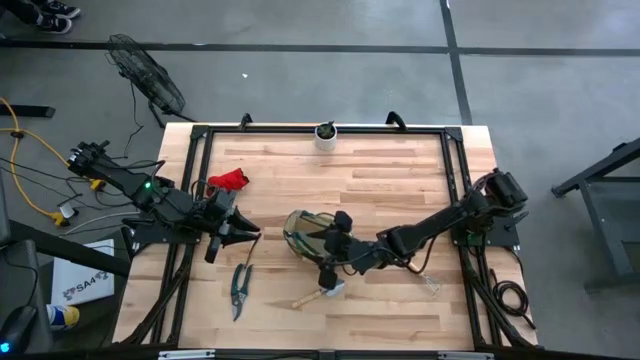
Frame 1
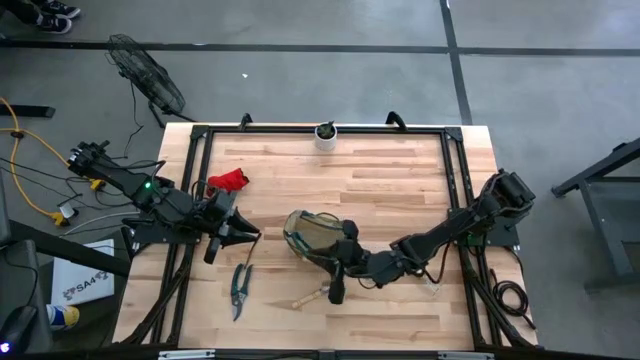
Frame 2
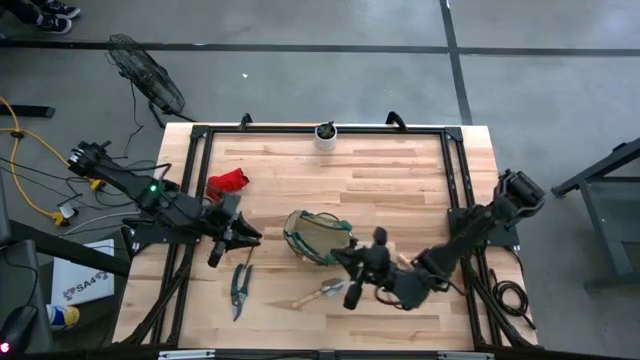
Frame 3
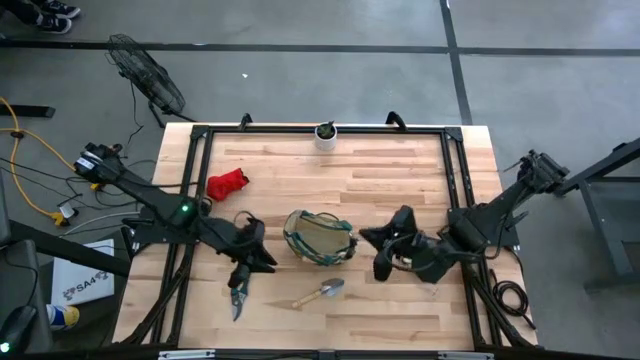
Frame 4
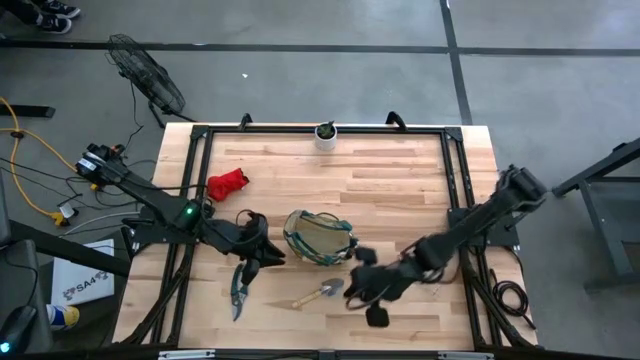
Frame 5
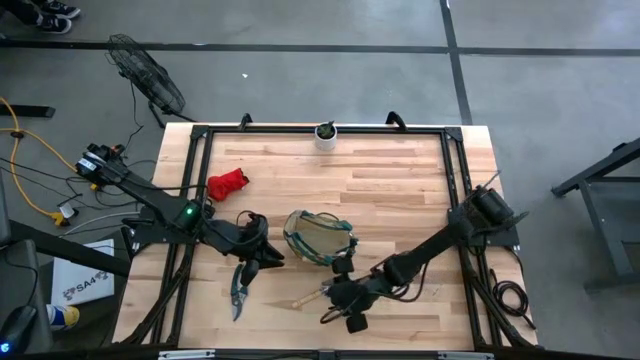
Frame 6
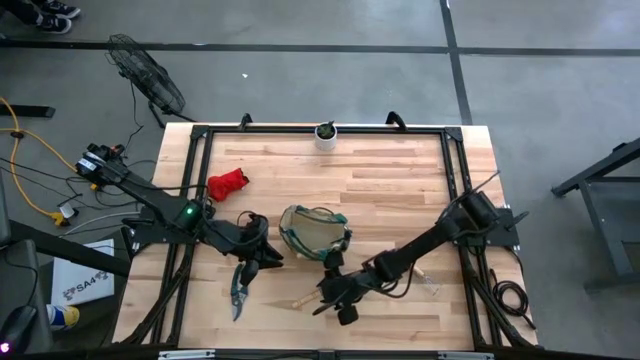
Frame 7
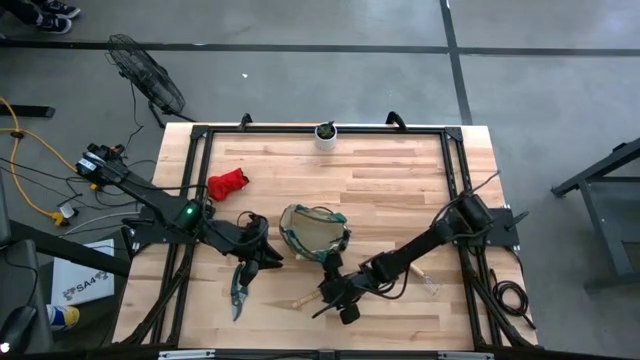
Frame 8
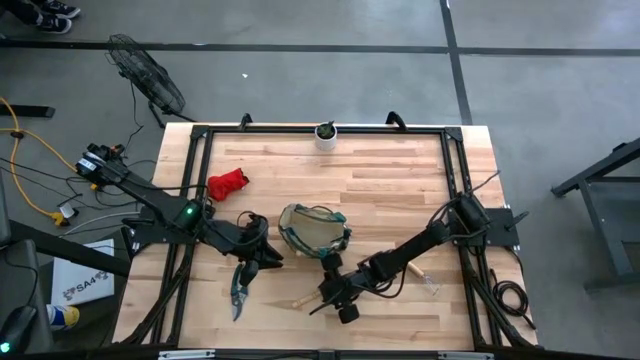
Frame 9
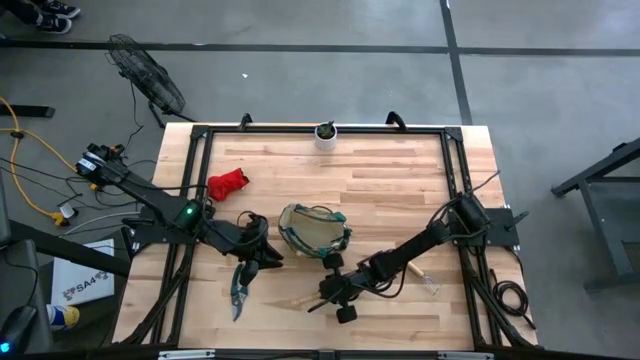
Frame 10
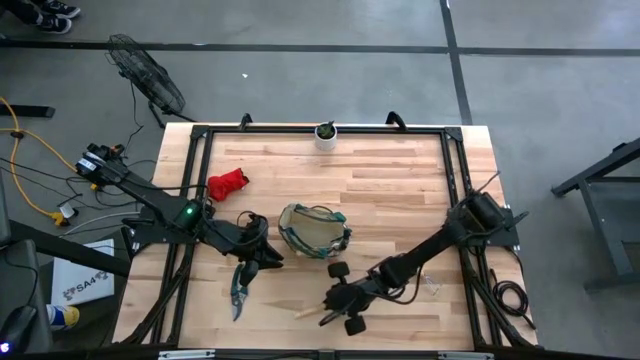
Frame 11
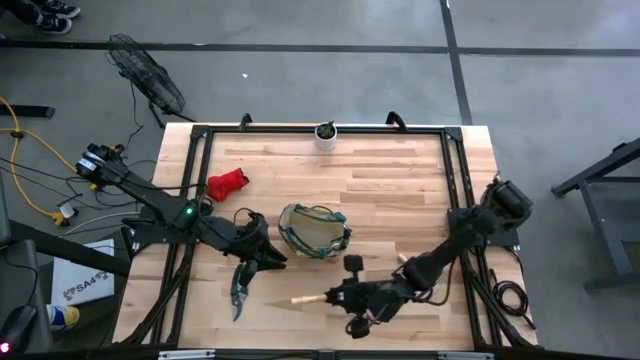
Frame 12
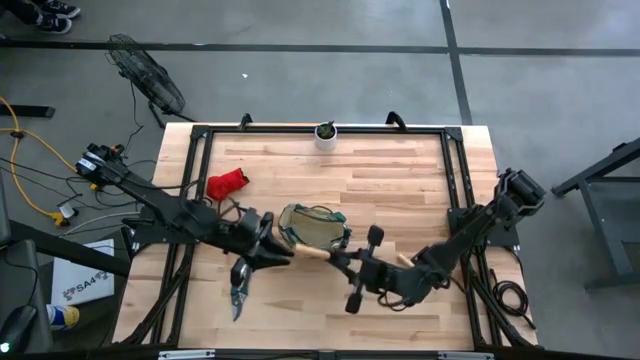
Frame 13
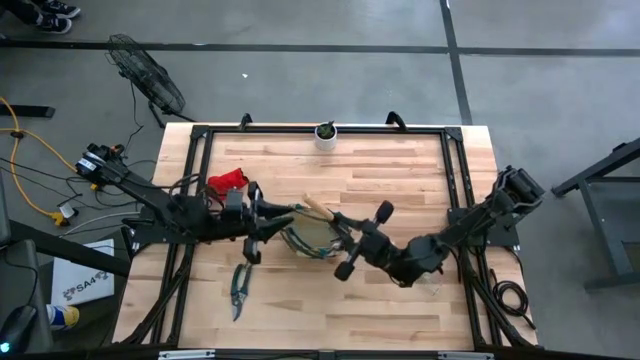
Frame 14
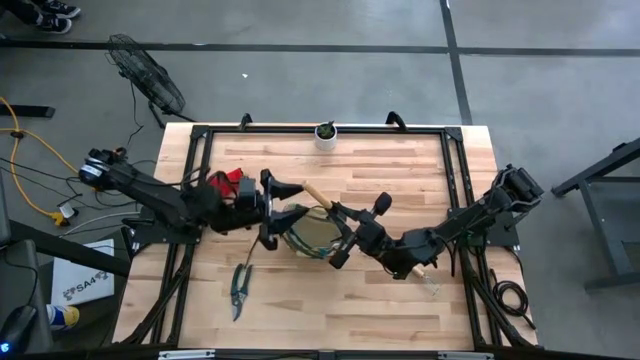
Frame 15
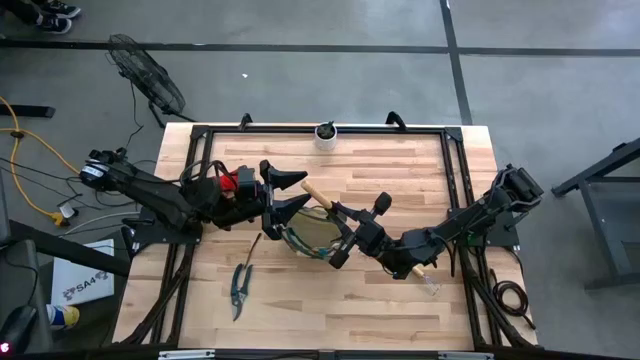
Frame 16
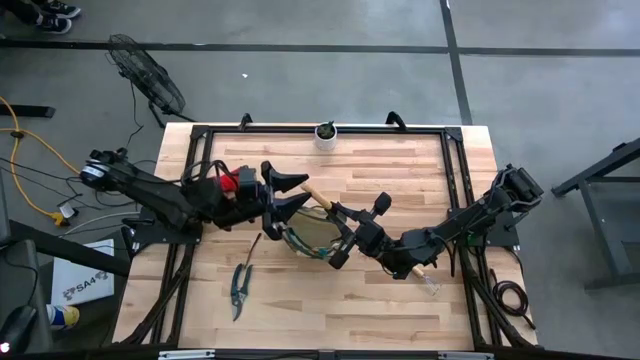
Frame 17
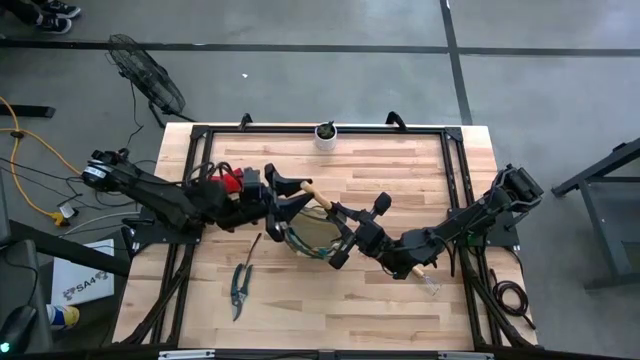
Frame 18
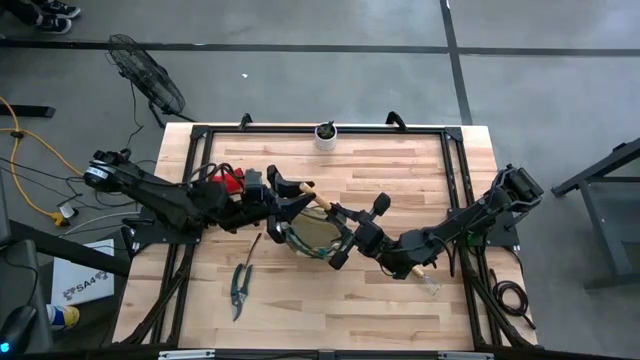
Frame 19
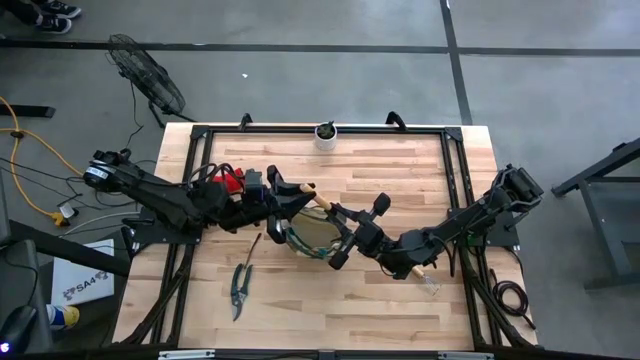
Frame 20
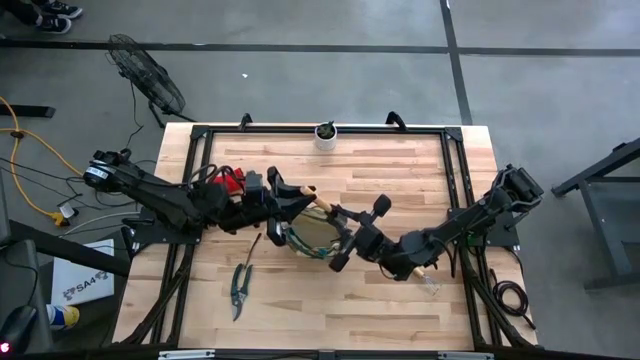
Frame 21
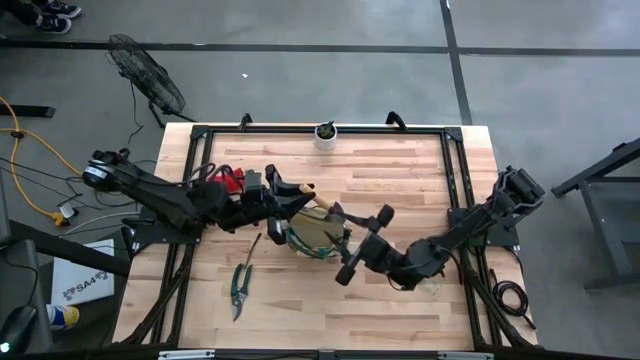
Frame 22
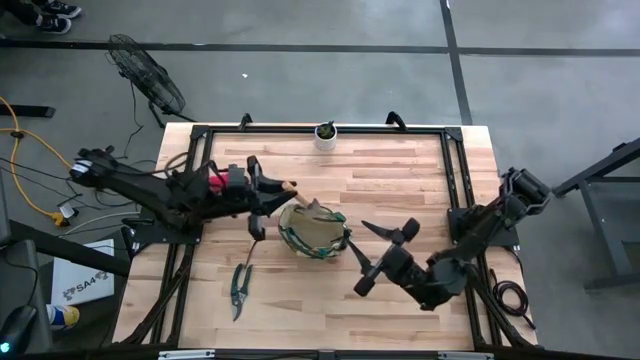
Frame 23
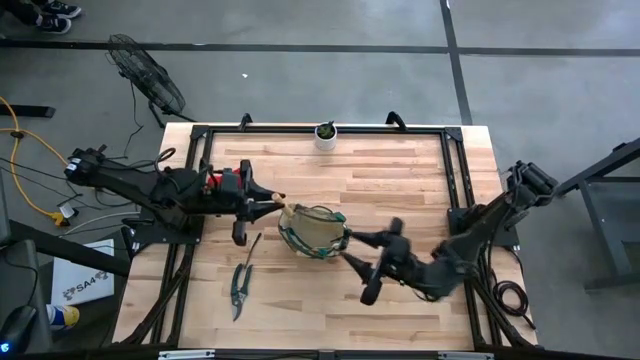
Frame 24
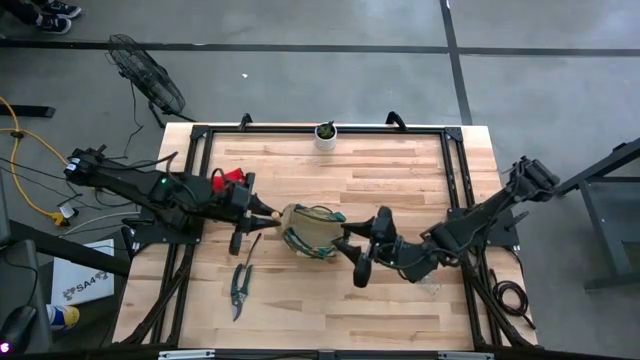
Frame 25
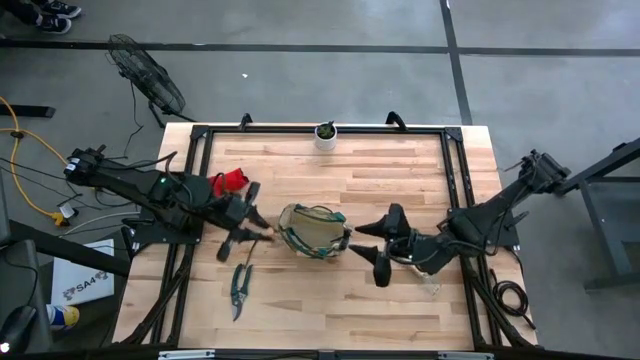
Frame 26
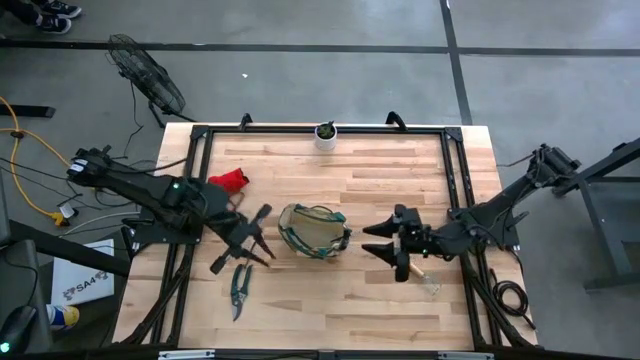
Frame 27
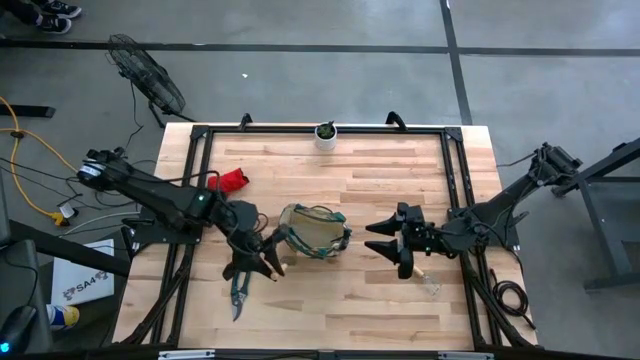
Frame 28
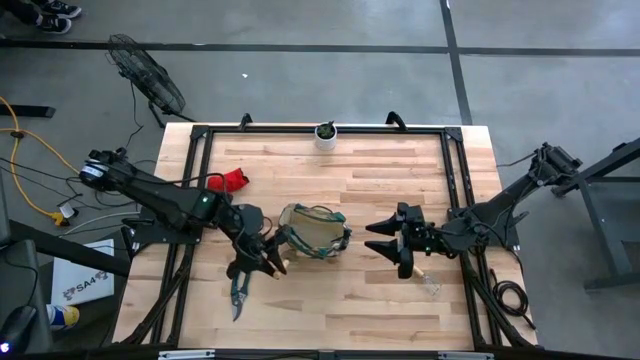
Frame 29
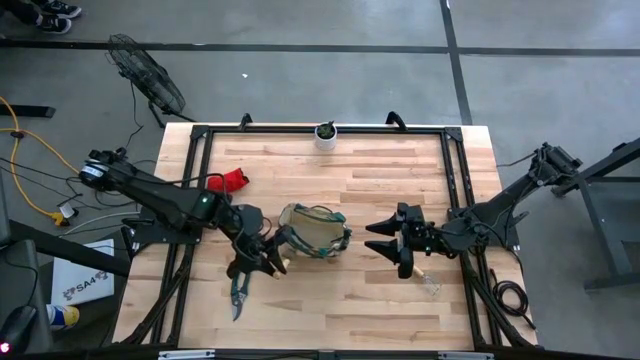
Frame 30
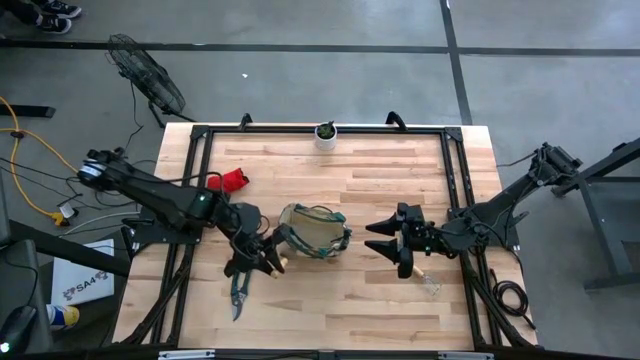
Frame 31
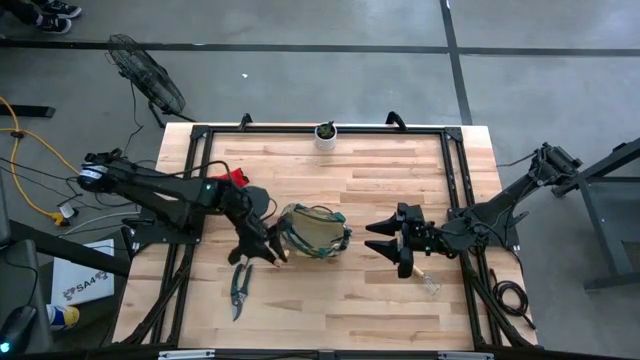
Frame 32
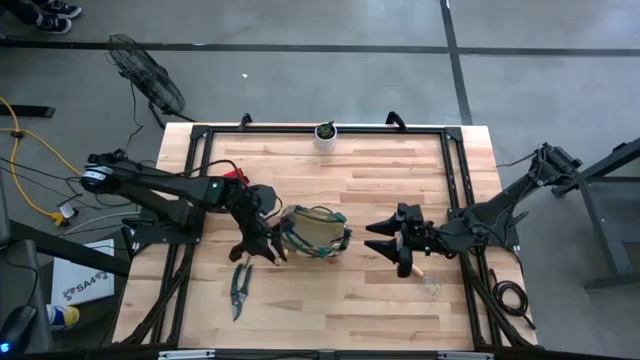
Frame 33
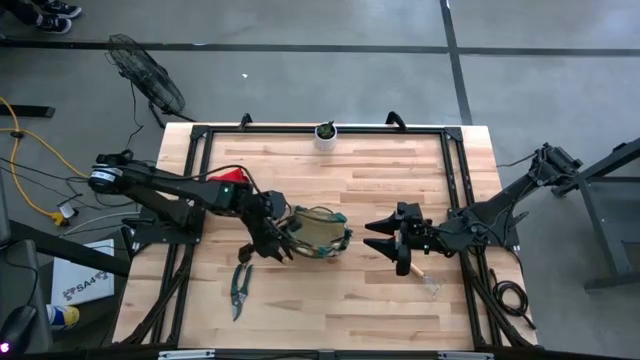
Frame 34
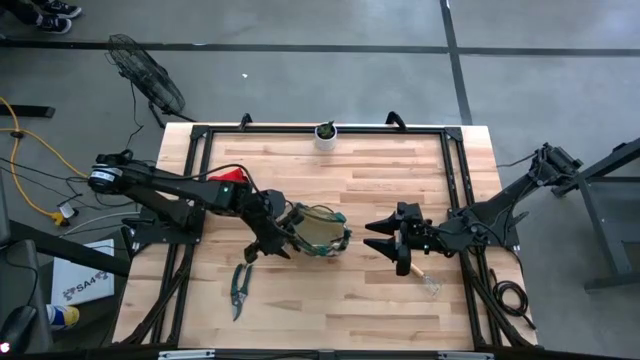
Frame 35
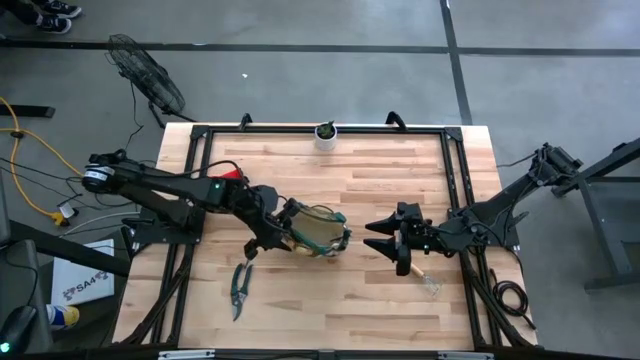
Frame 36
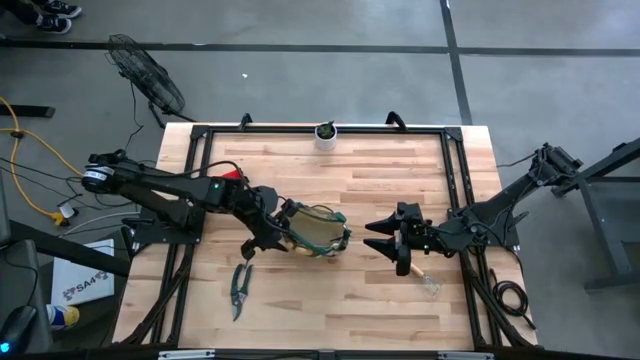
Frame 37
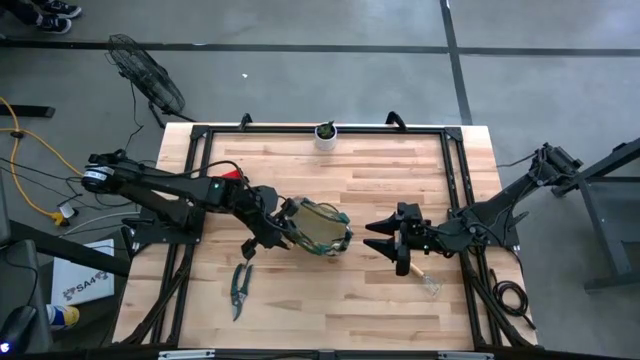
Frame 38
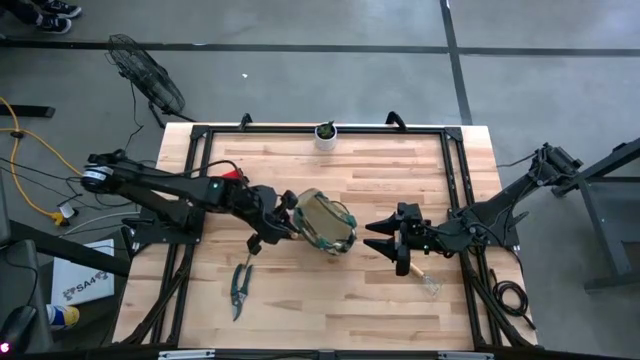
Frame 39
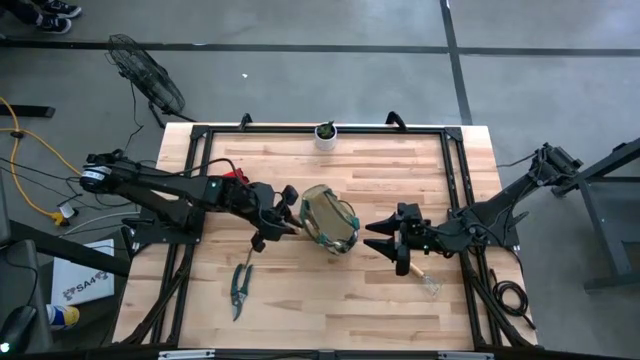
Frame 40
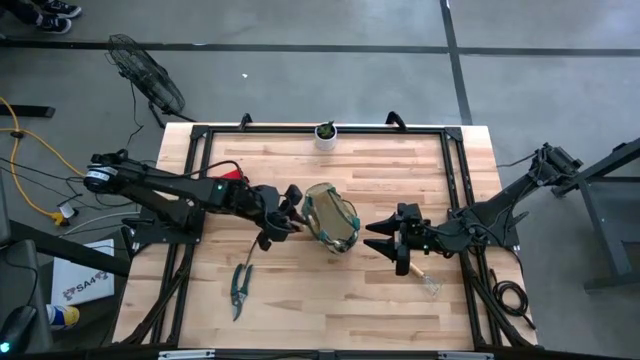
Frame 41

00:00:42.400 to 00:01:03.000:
Task: Pick & Place Garden tools in Gardening bag
Put the brown trowel into the gardening bag
